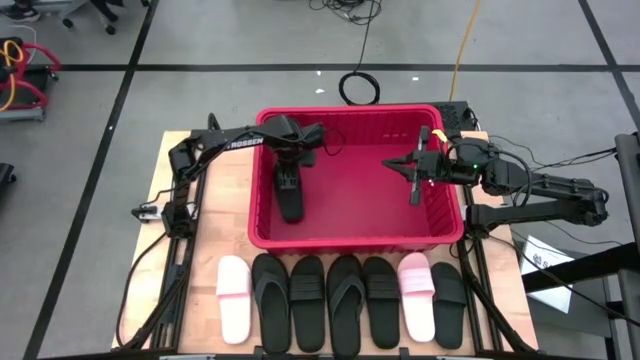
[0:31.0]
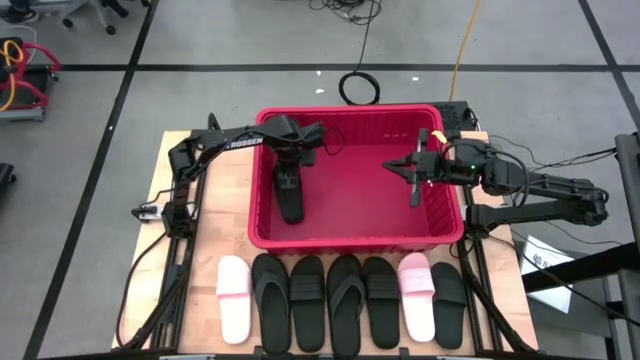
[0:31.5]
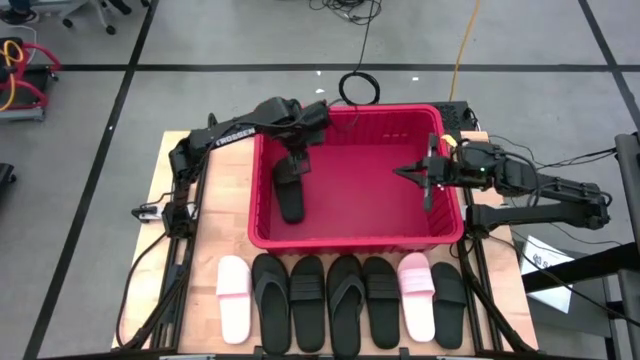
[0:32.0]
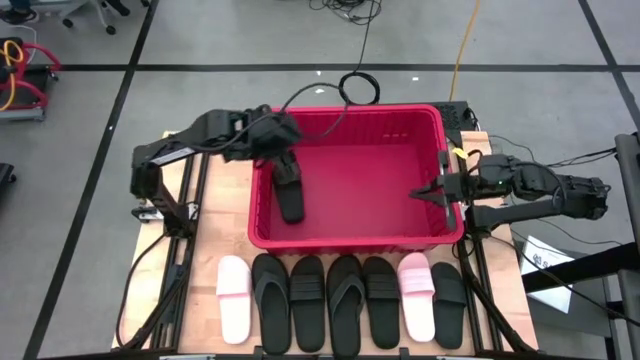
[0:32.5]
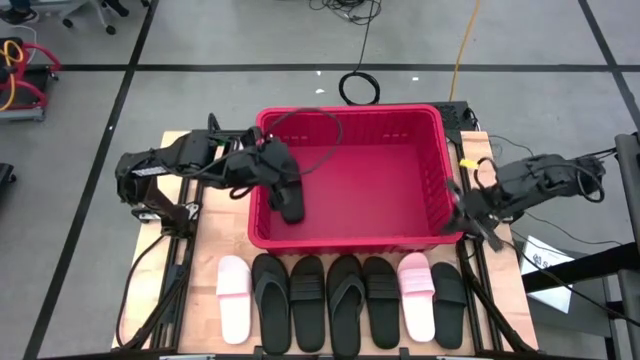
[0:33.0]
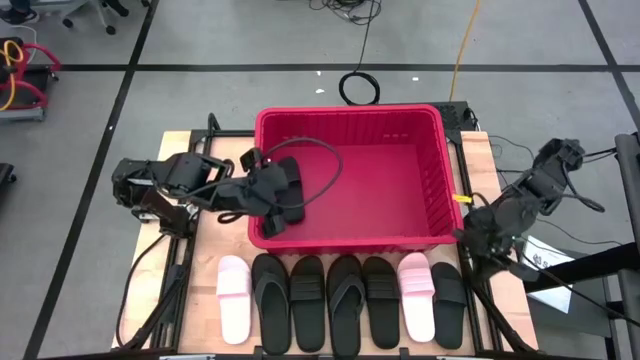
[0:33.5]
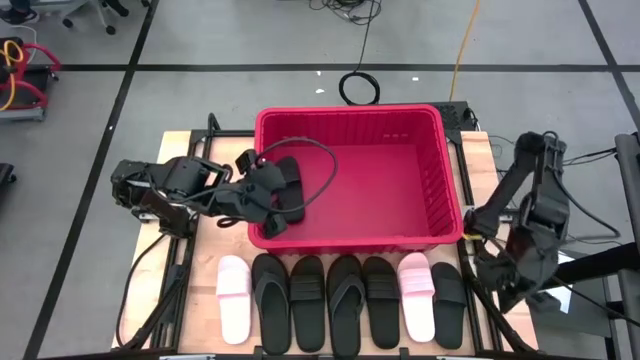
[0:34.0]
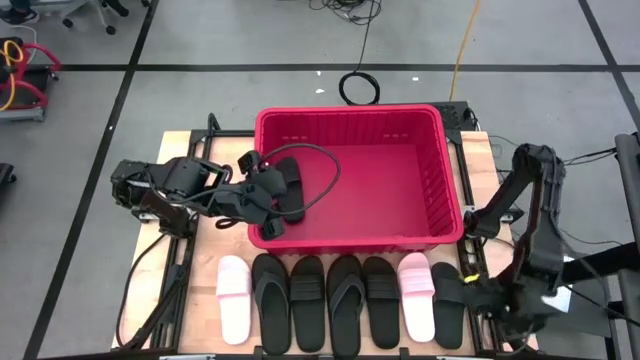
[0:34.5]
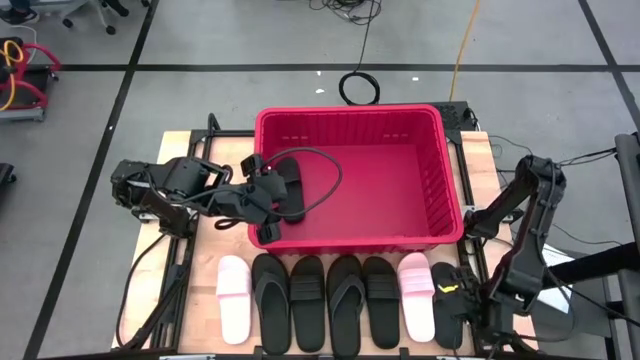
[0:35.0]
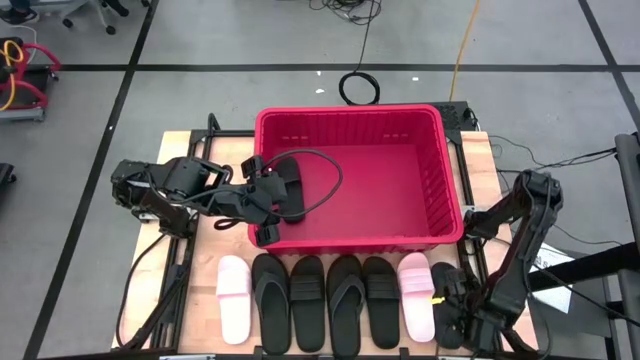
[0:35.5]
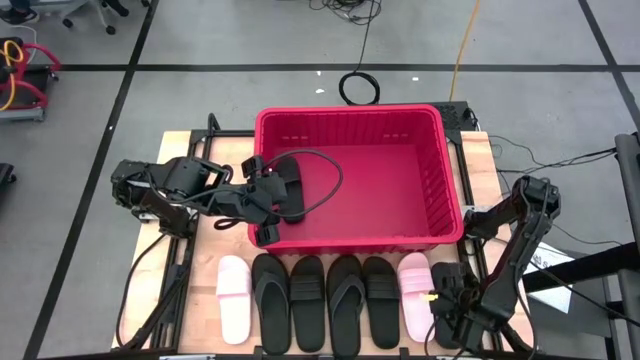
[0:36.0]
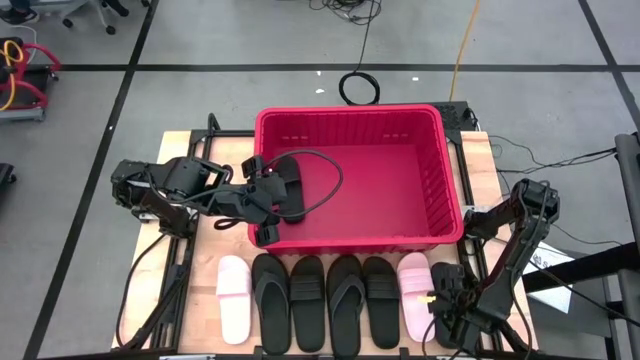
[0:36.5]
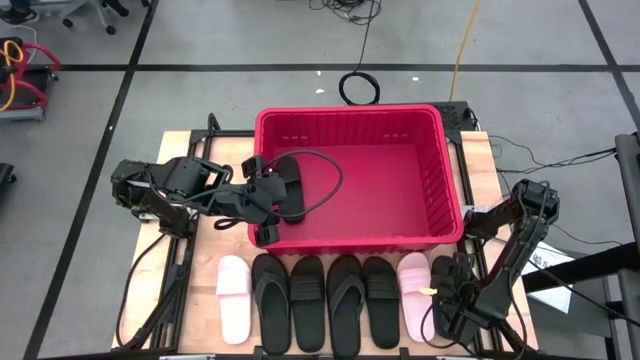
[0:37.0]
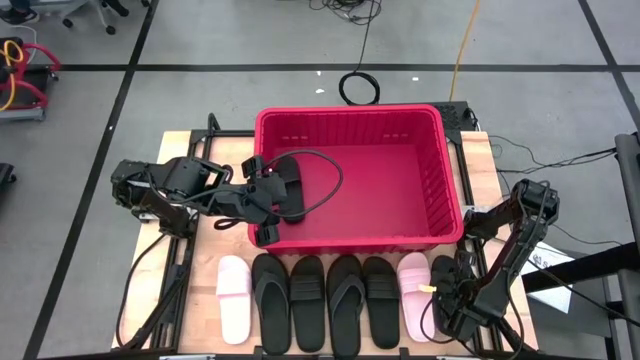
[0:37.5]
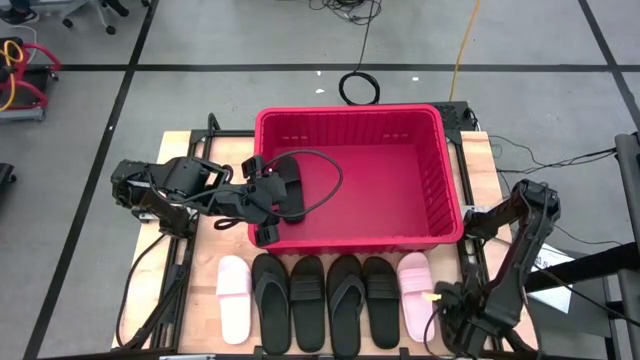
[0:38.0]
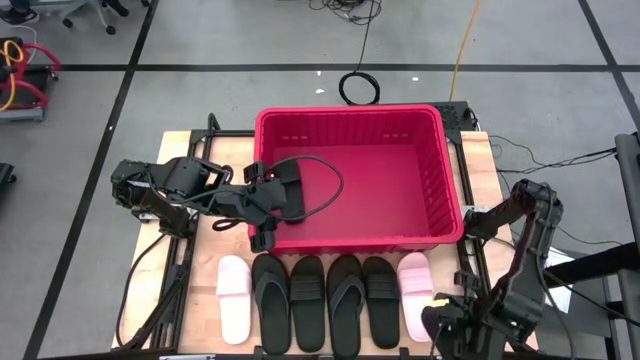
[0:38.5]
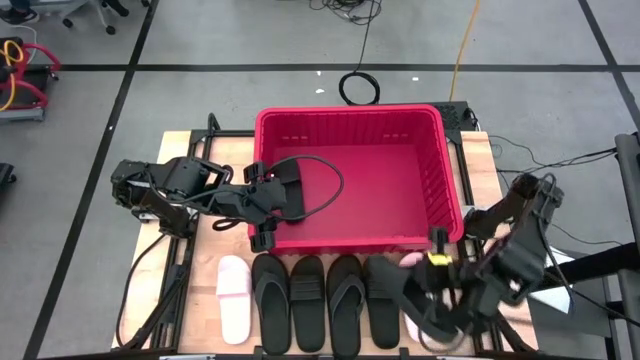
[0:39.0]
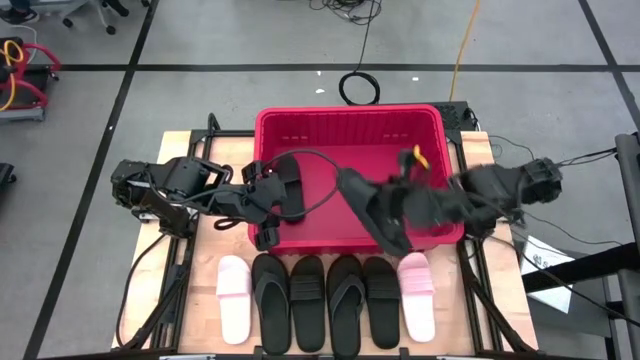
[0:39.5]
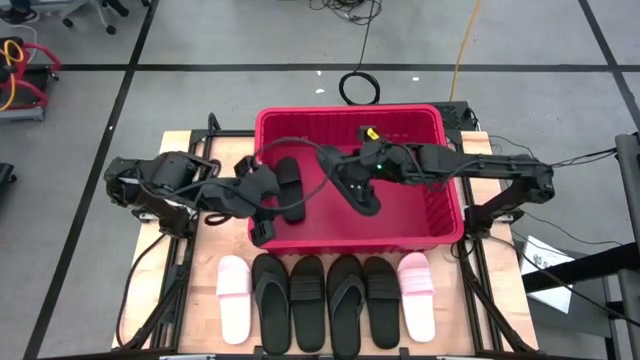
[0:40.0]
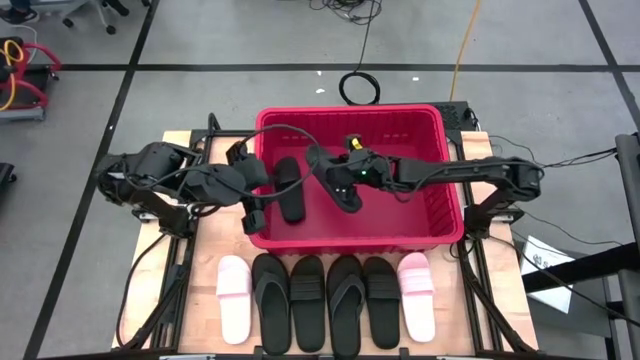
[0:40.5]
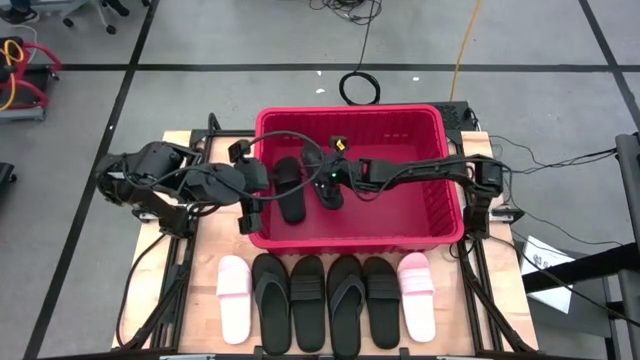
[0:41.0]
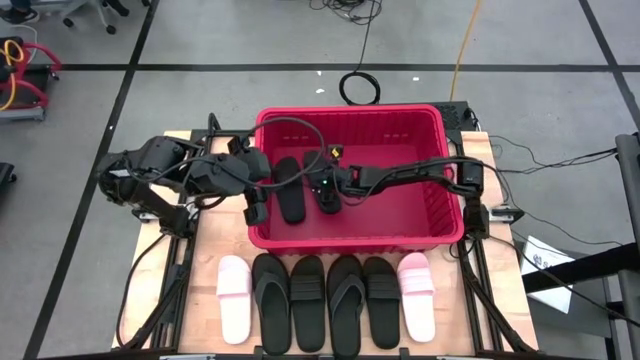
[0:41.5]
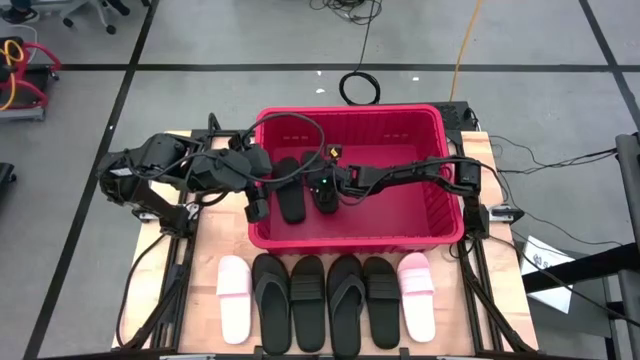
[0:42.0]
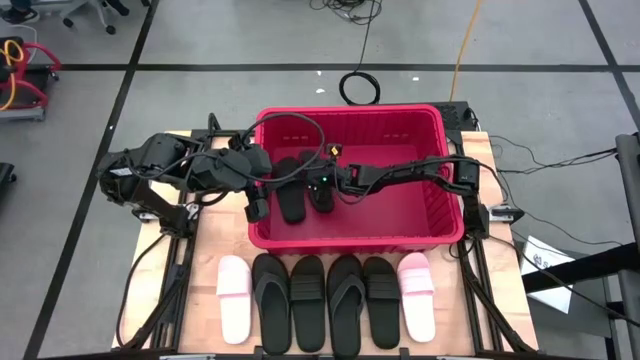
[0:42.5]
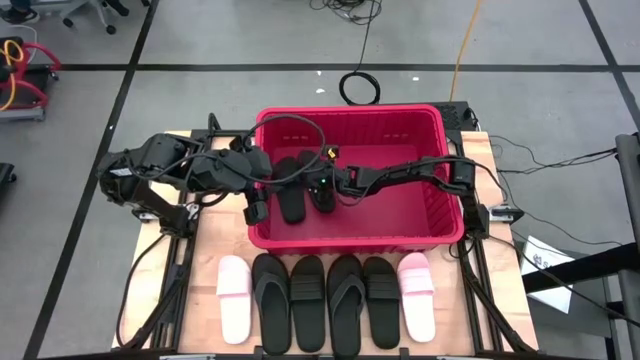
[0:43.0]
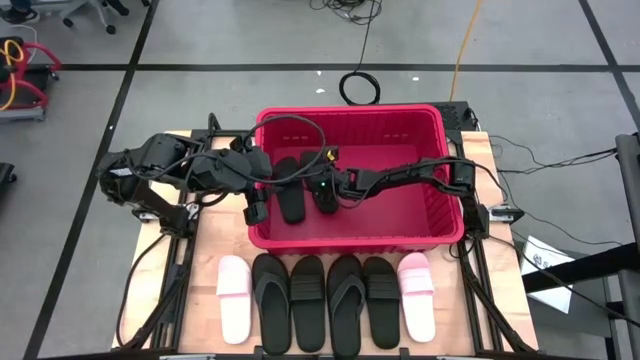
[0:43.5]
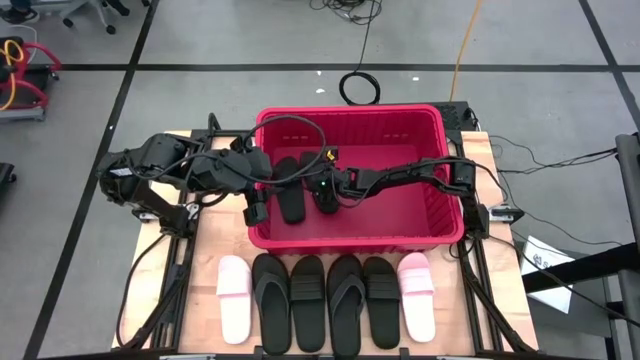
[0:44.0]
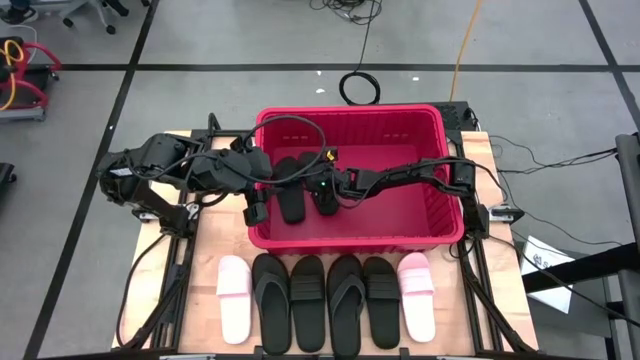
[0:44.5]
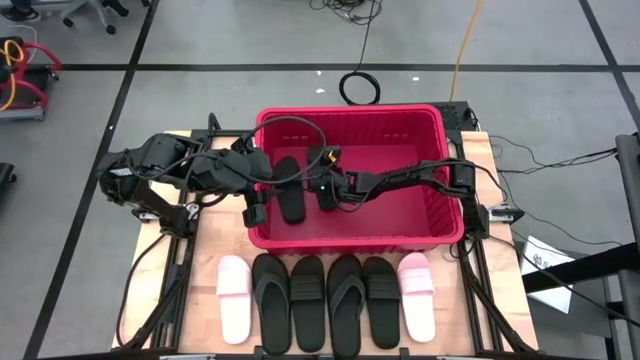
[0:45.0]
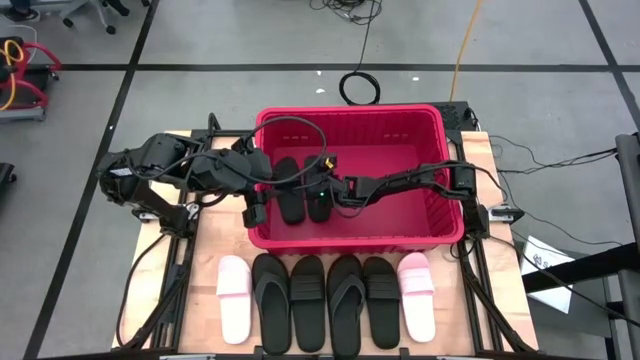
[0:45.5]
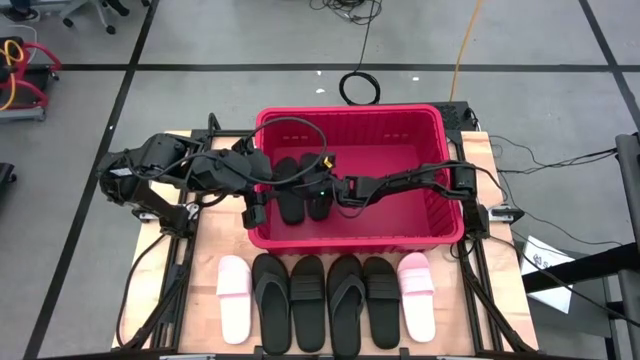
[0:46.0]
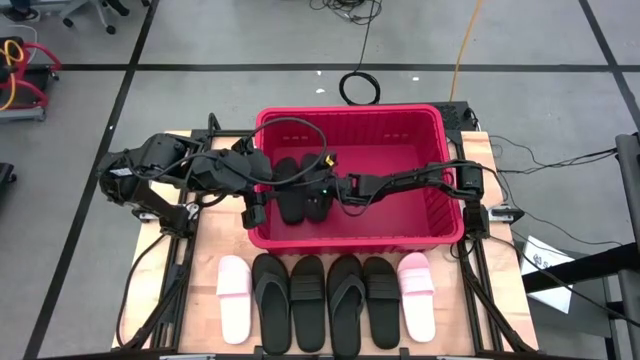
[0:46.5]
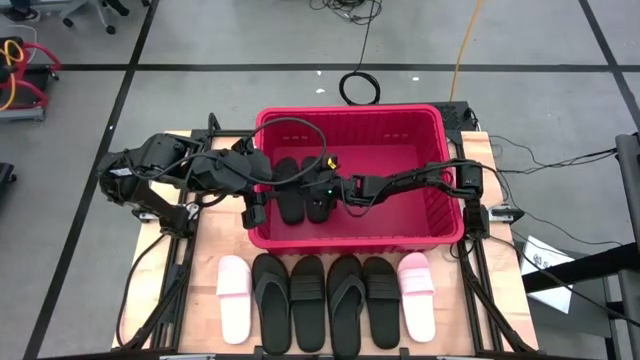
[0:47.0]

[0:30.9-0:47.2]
Task: Pick and place slides into bin
Put the black slide into the red bin

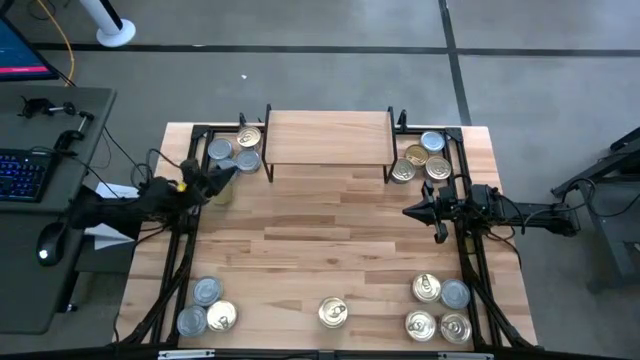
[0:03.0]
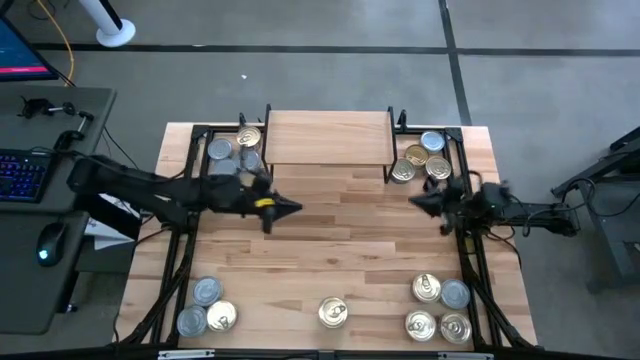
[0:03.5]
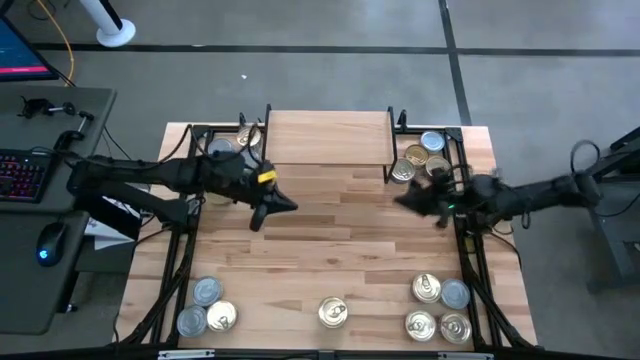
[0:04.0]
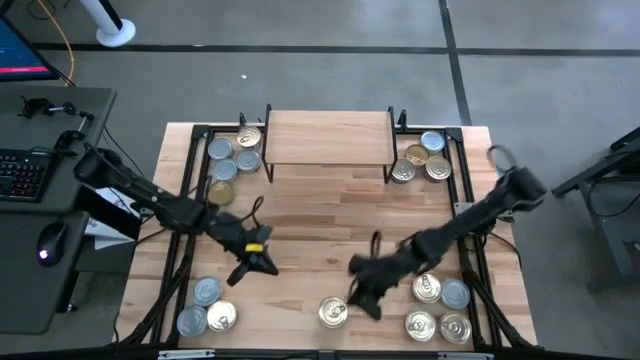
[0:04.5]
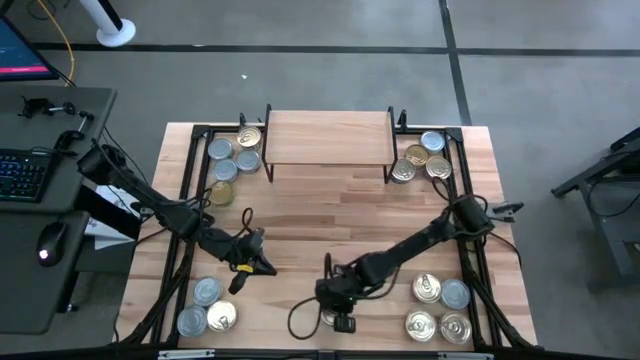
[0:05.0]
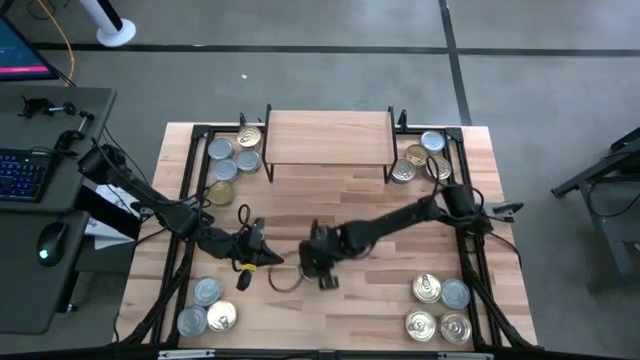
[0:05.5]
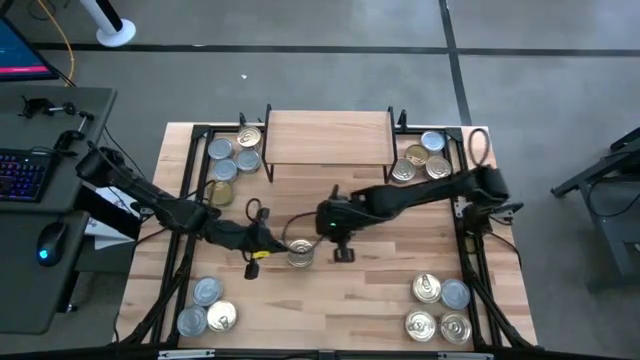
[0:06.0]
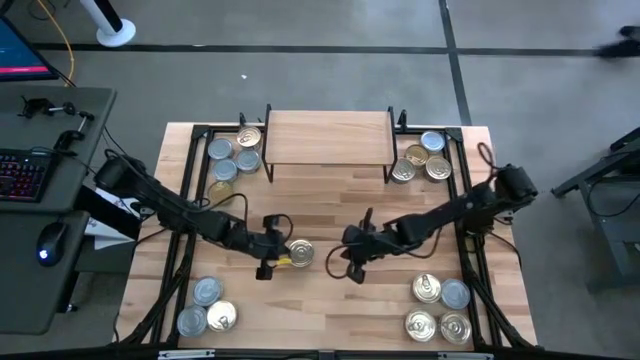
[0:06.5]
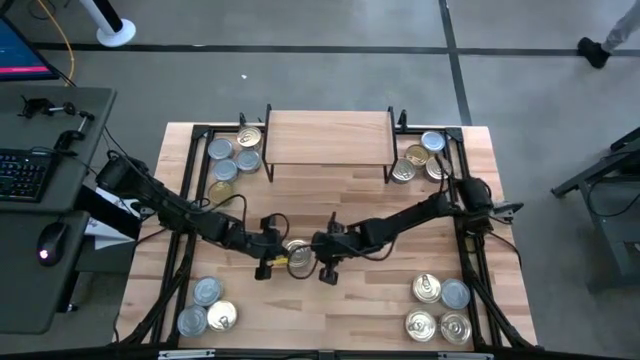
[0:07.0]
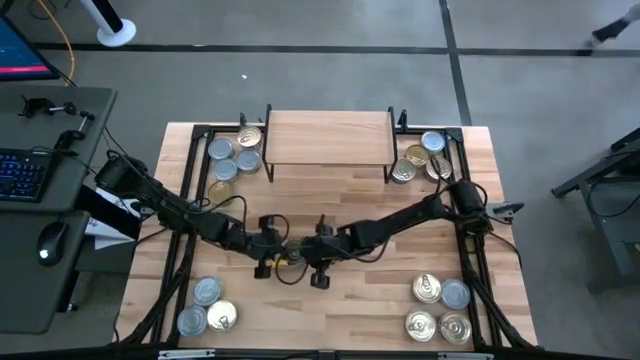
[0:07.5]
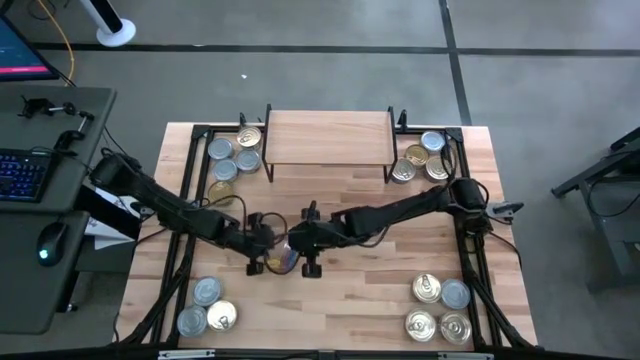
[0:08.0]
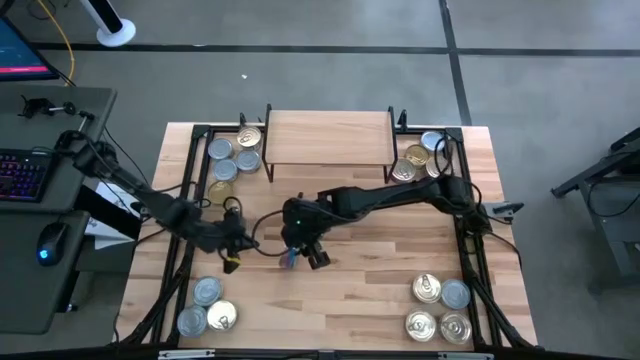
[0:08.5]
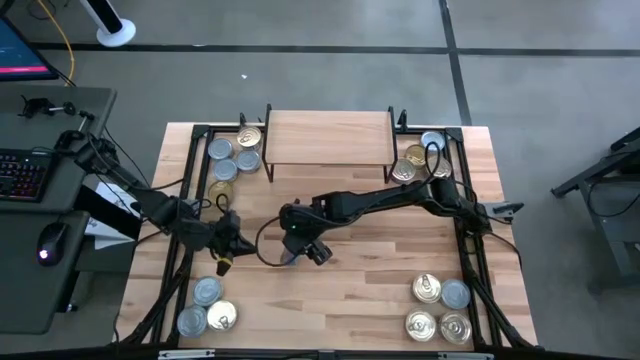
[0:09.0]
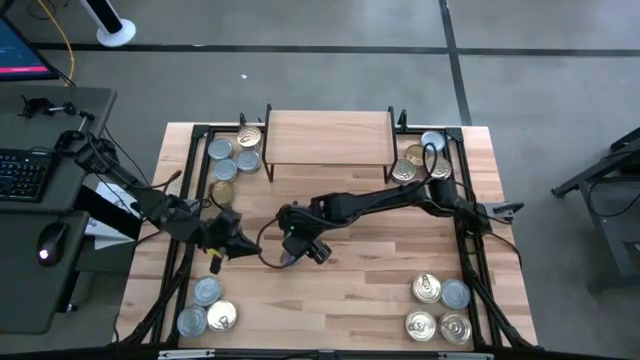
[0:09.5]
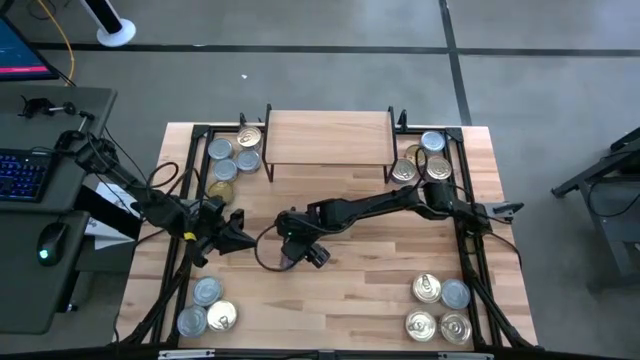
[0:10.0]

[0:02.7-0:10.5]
Task: Stack canned seafood by type on shelf
Put the blue pink tuna can on the shelf
